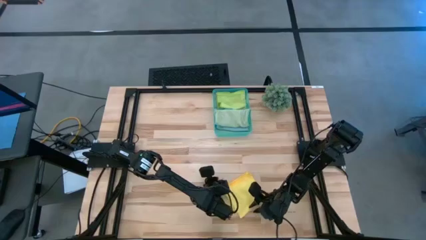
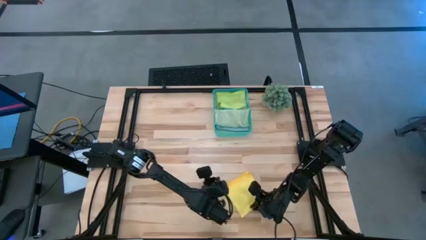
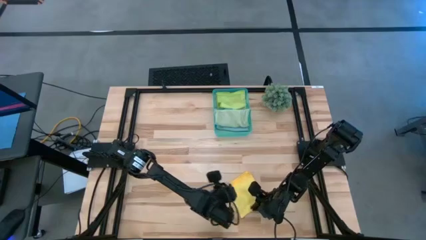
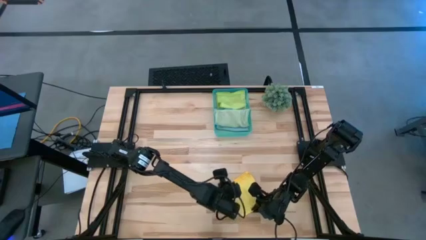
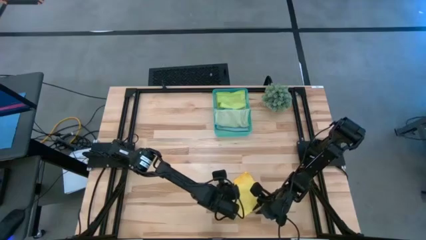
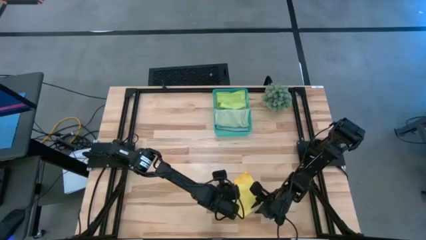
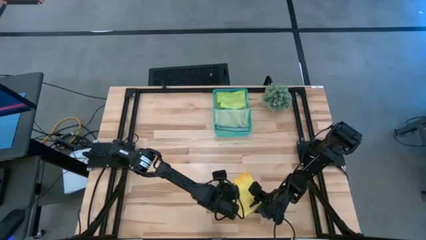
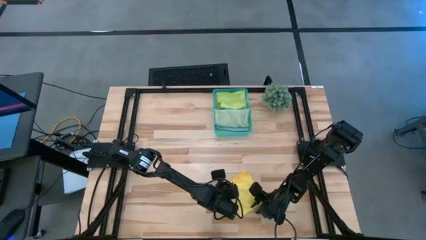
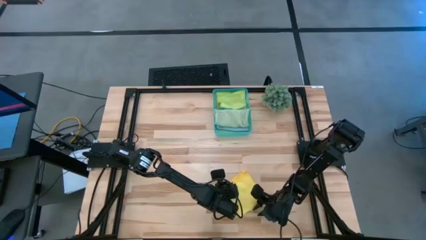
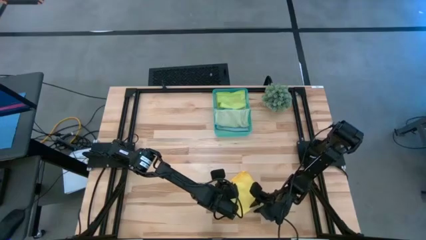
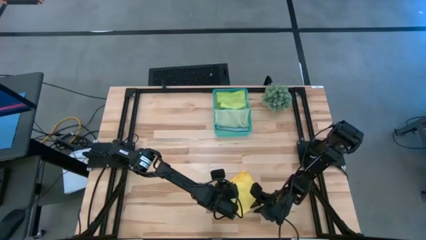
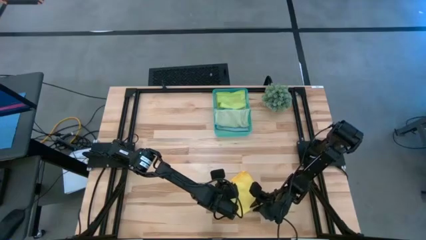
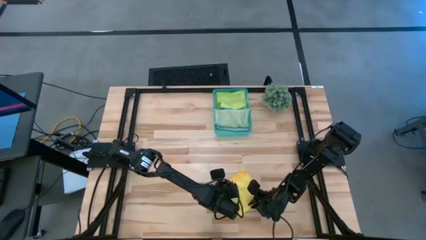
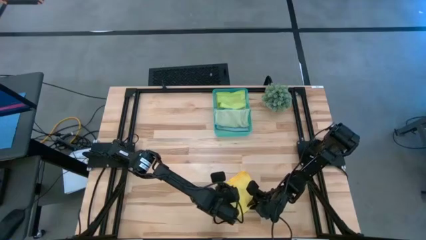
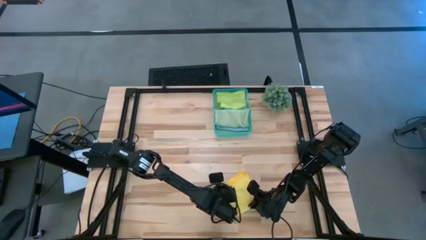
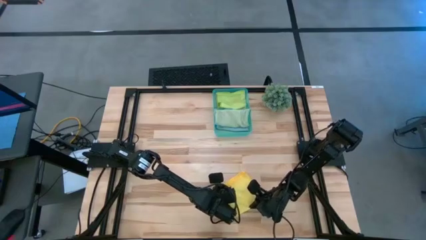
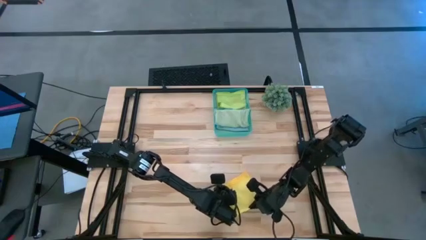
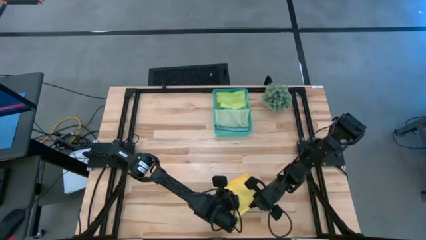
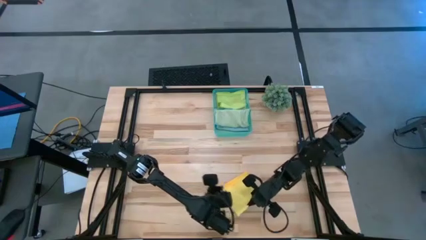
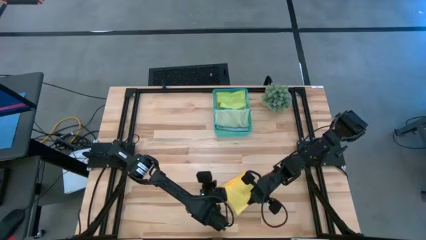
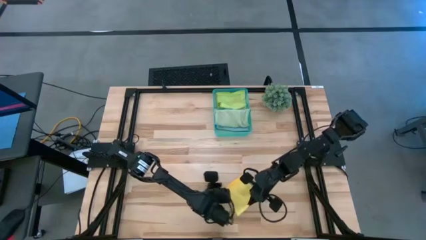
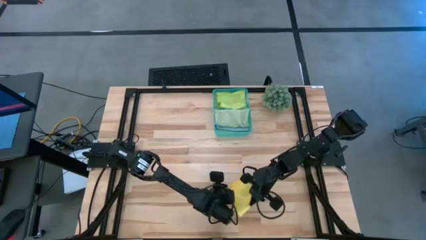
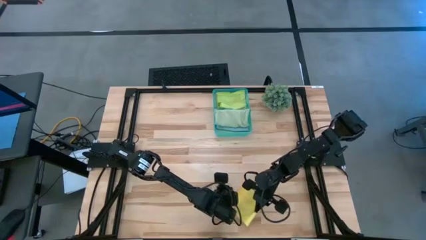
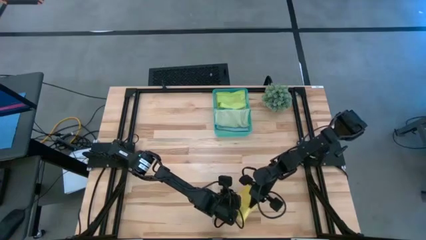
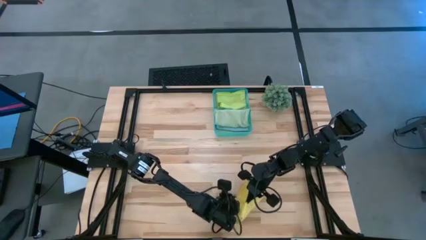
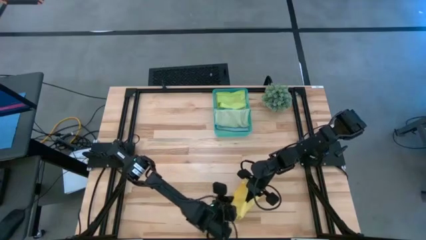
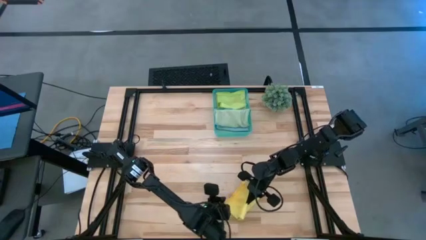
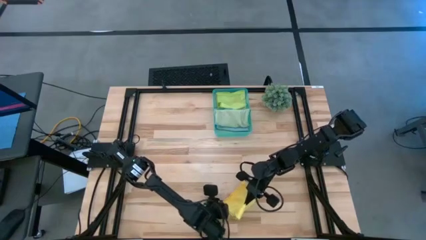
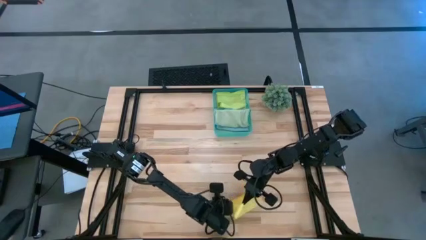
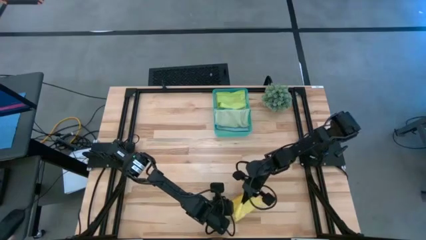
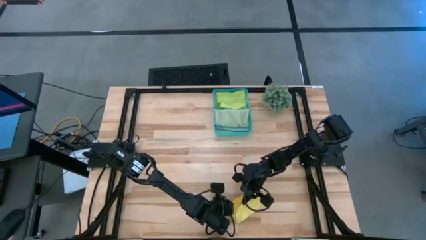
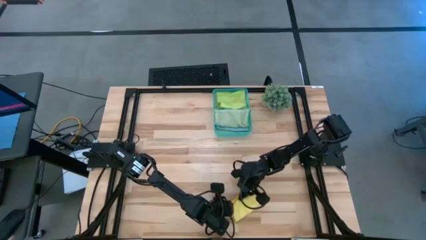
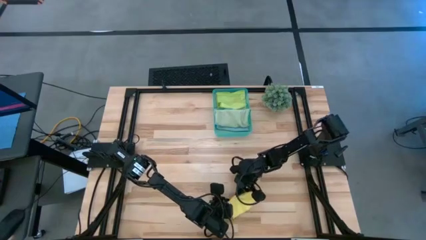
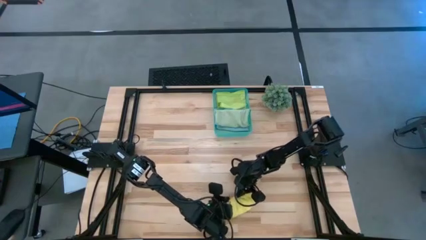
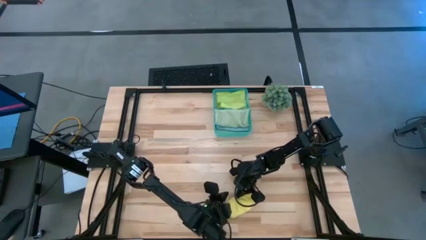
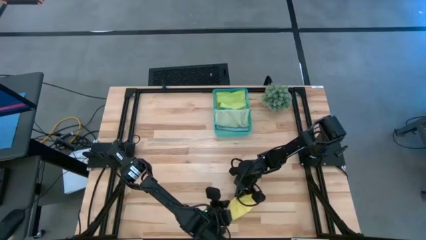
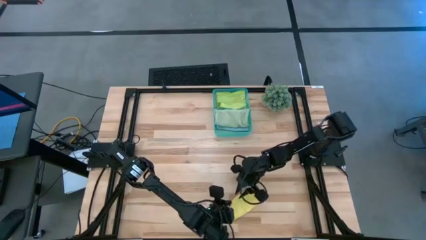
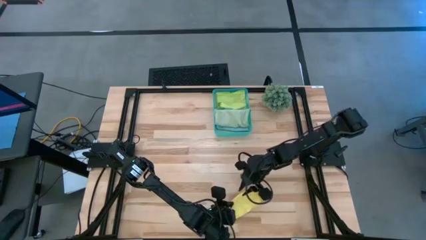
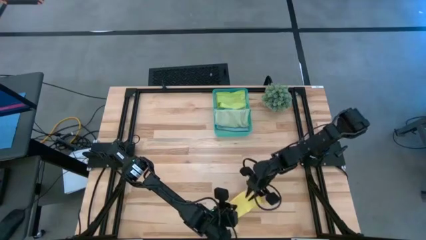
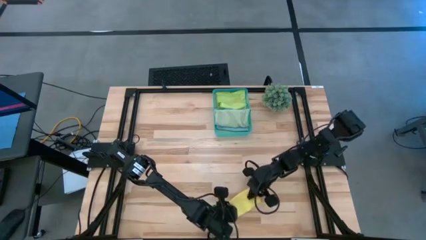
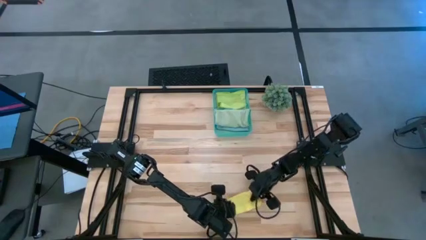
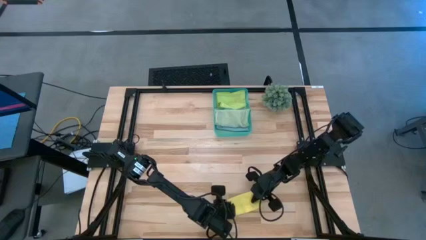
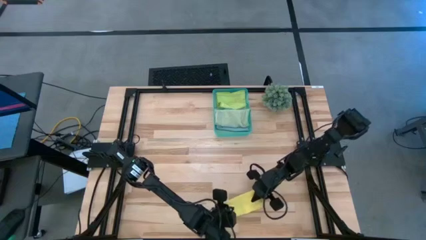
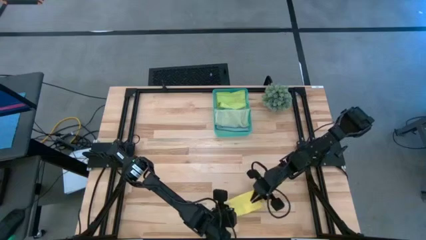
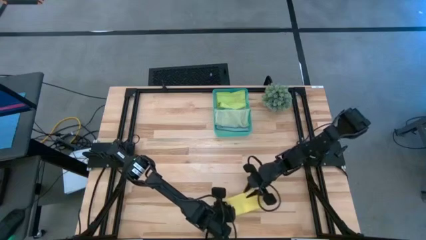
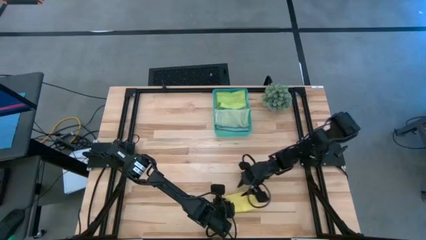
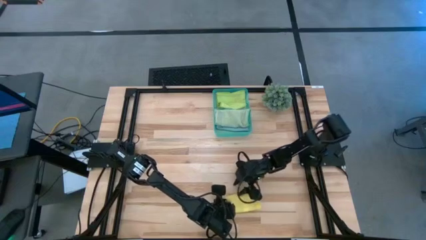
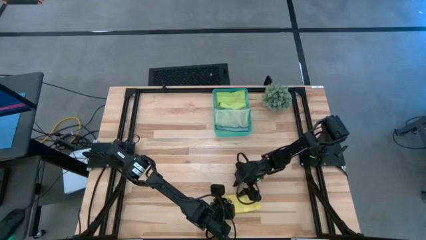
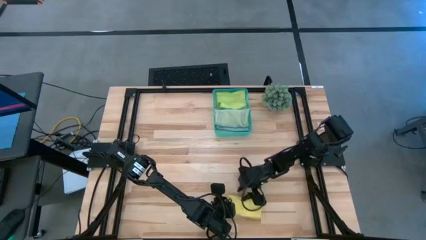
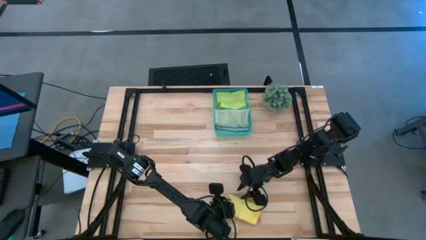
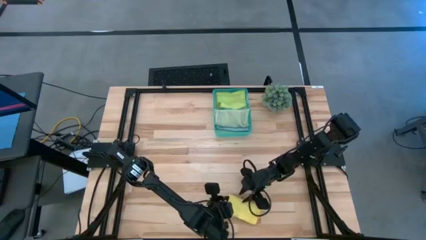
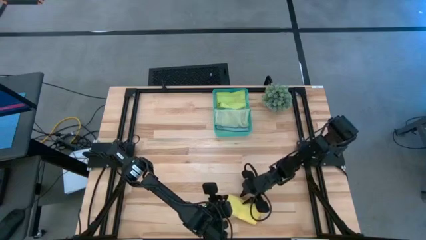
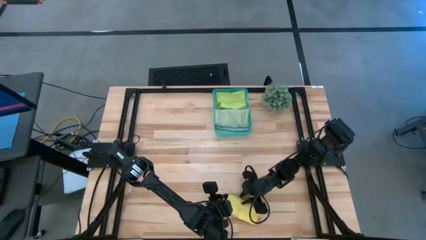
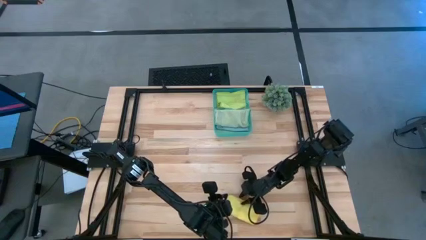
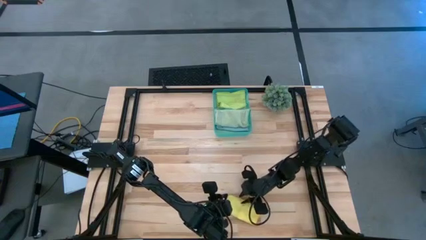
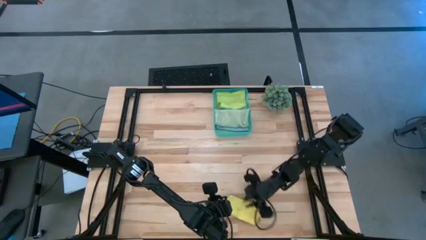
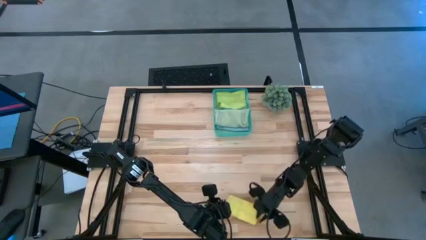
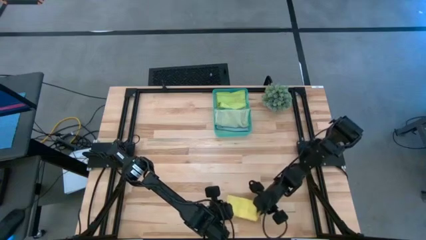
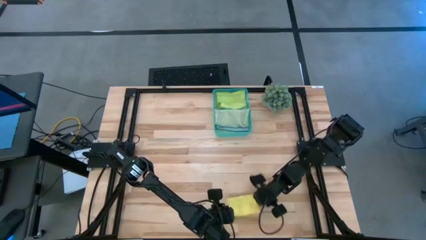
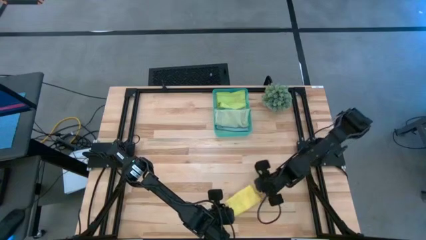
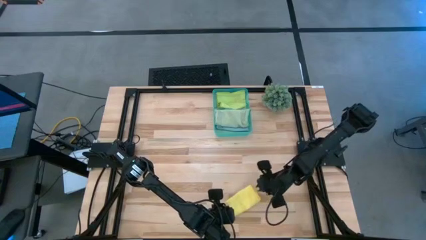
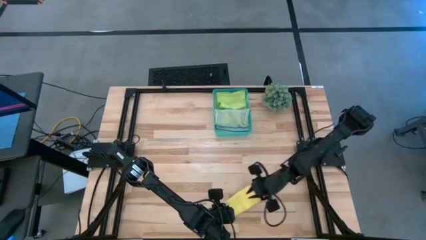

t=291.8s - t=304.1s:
Task: Fold microfiber towels
Fold the yellow microfiber cloth

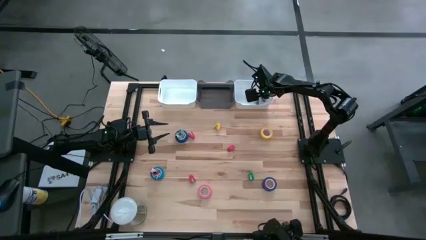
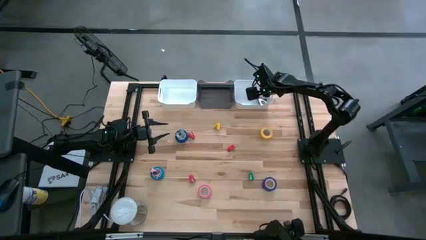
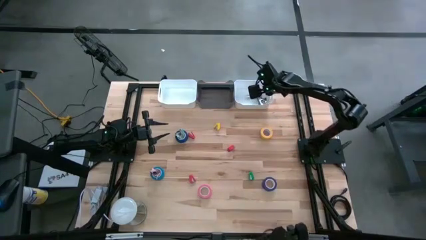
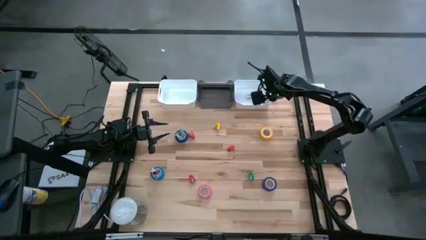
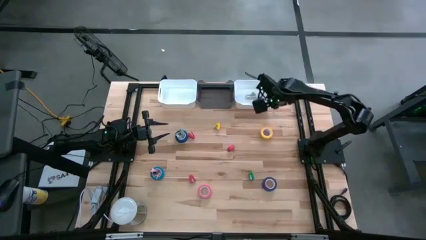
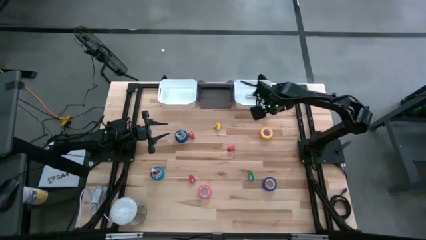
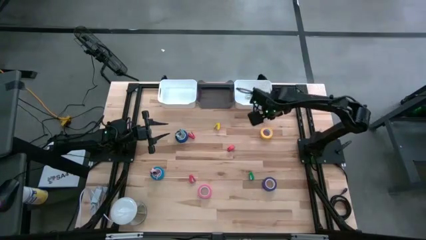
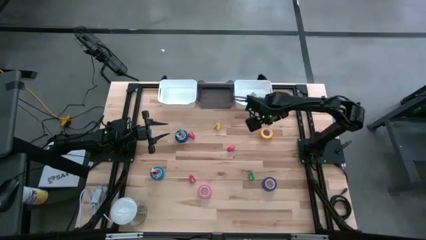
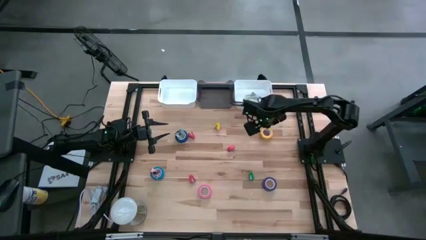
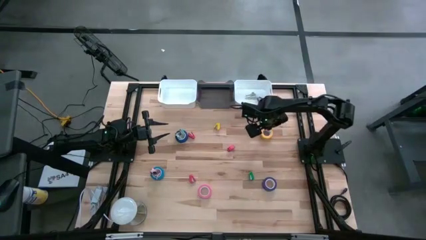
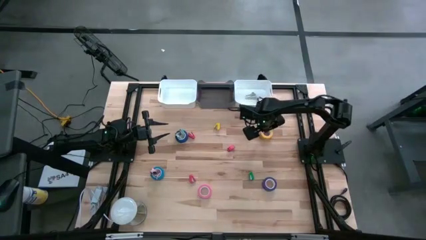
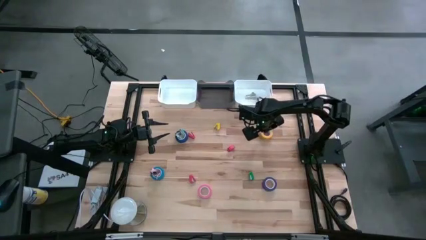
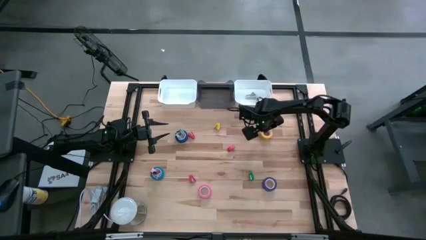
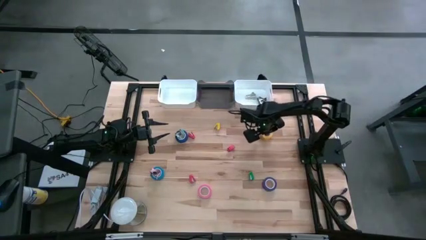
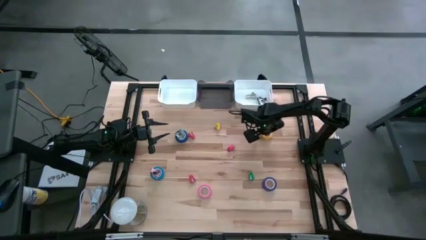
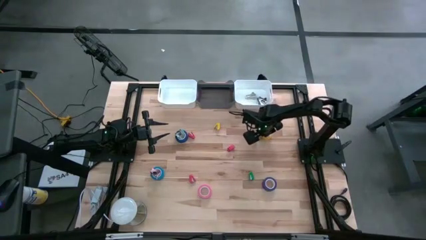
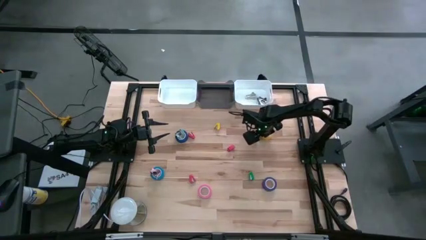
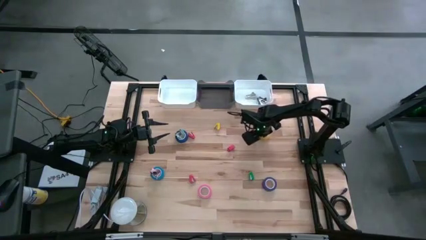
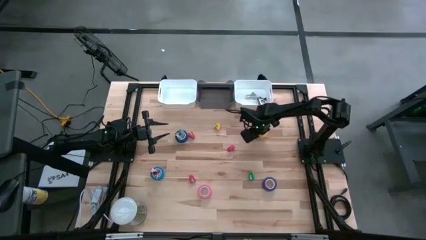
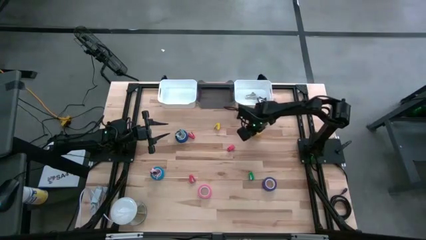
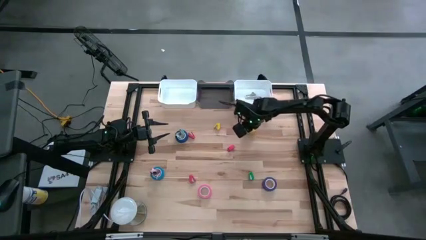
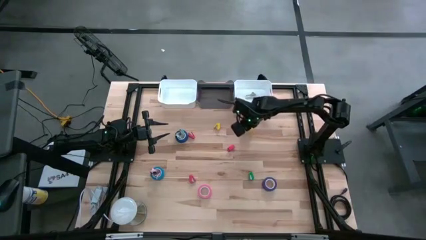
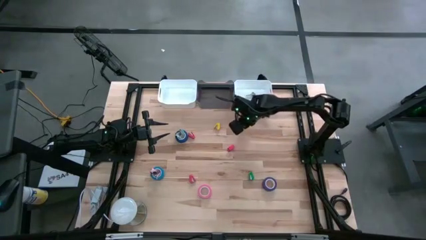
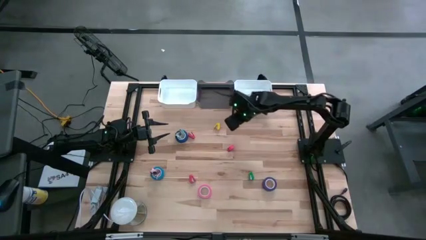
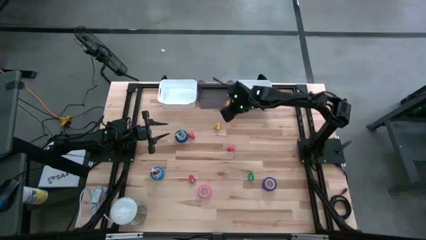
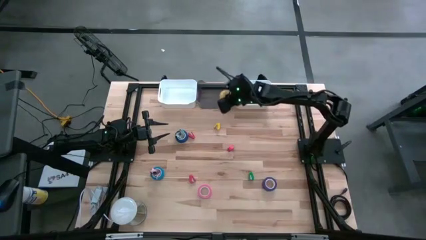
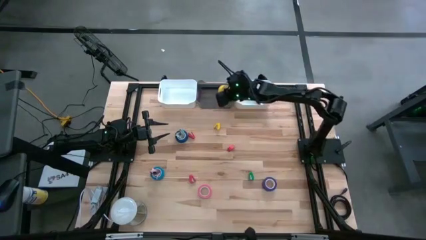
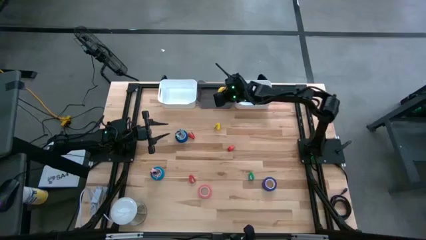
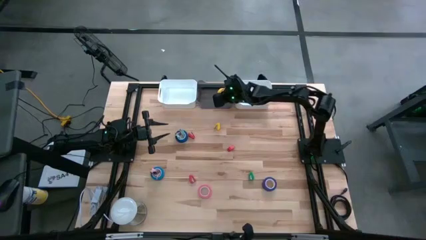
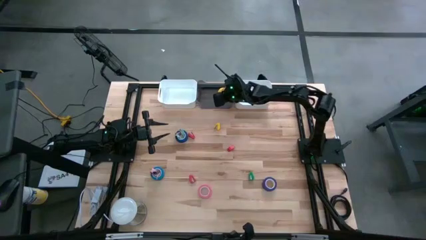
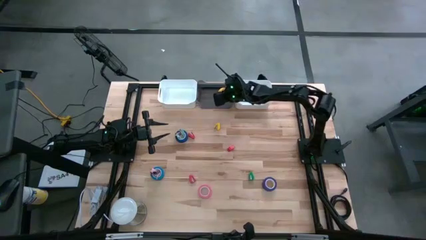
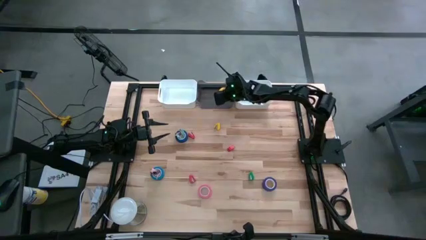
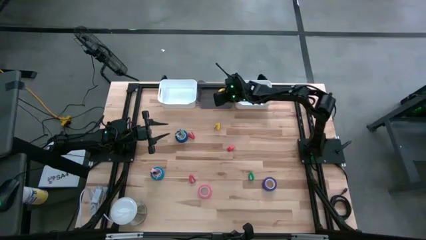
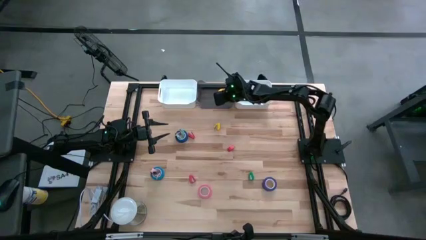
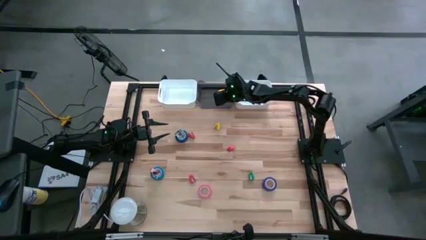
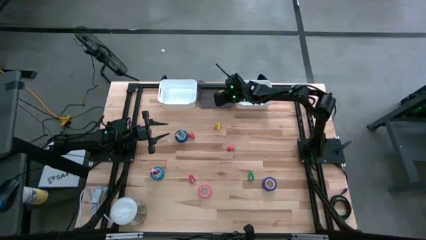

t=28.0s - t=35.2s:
Task: Pick and place Stapler, Stapler remover, tape
Put the yellow tape into the black bin
